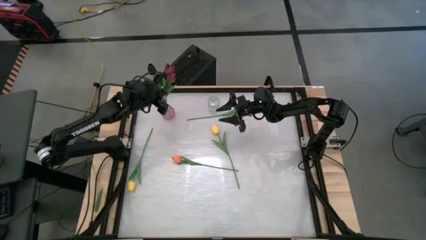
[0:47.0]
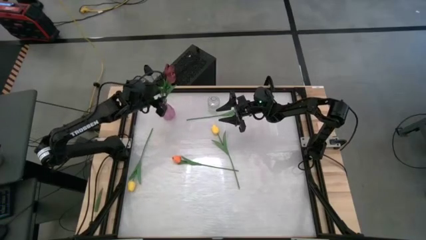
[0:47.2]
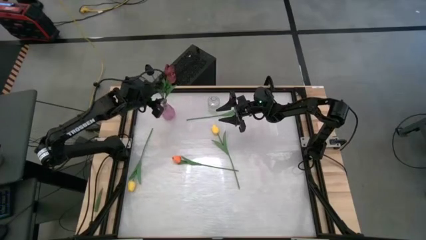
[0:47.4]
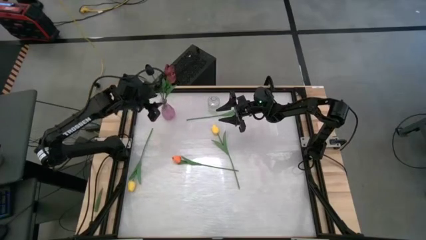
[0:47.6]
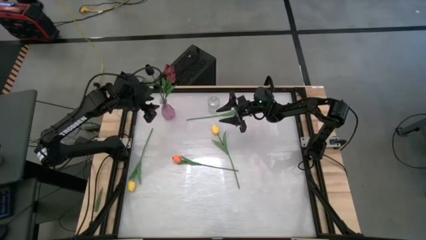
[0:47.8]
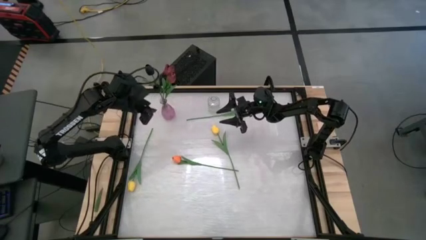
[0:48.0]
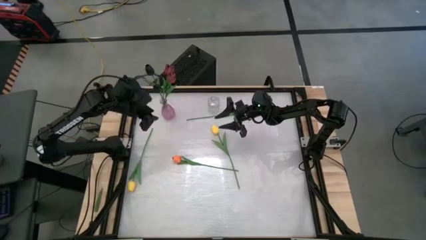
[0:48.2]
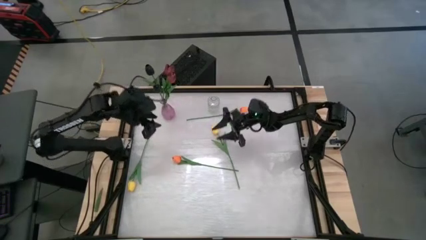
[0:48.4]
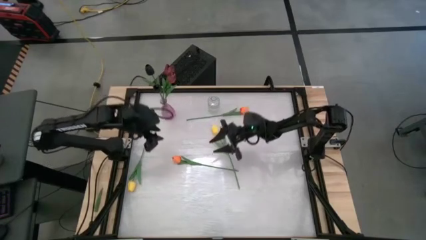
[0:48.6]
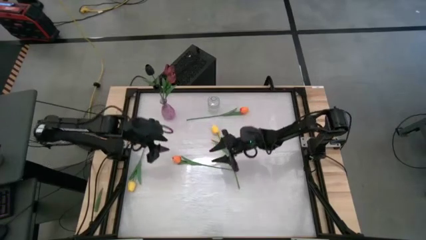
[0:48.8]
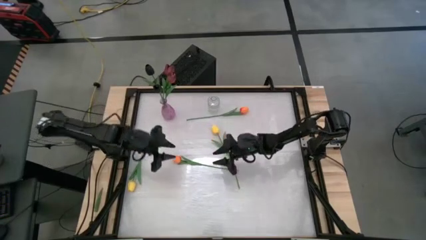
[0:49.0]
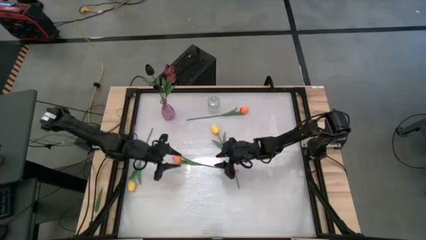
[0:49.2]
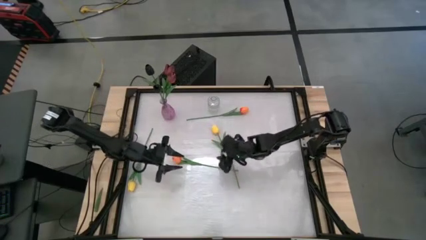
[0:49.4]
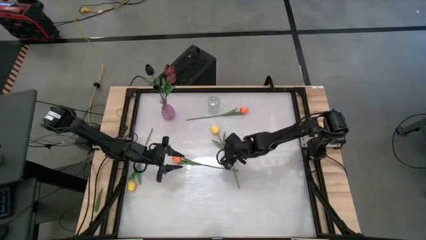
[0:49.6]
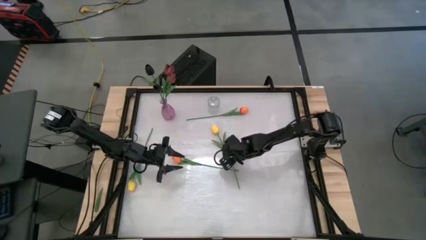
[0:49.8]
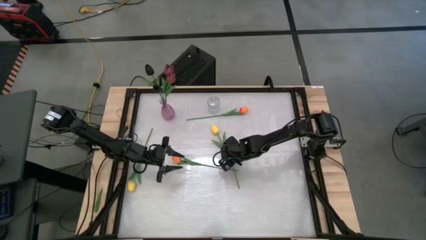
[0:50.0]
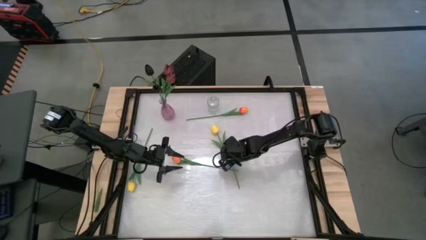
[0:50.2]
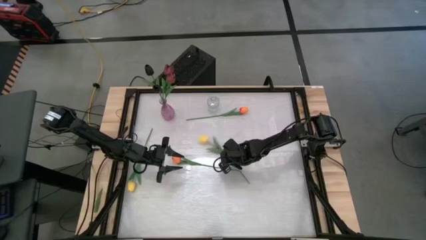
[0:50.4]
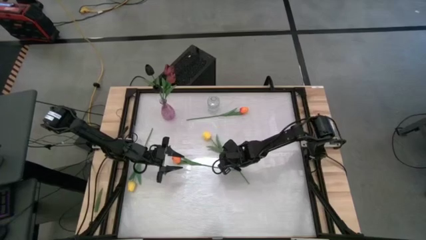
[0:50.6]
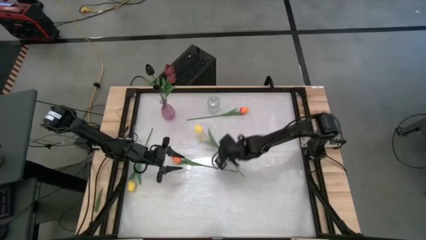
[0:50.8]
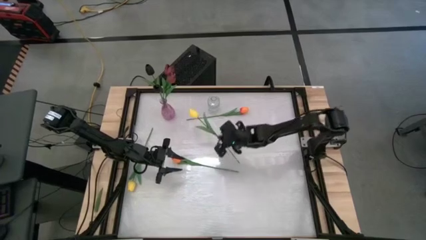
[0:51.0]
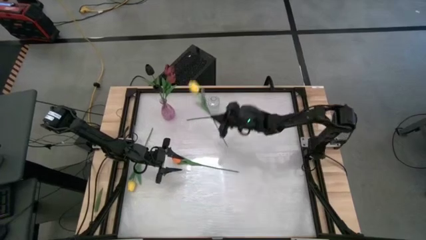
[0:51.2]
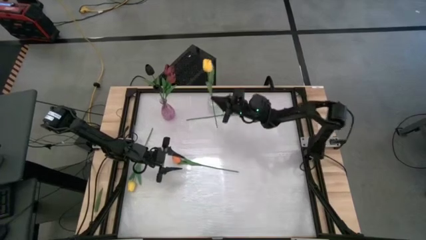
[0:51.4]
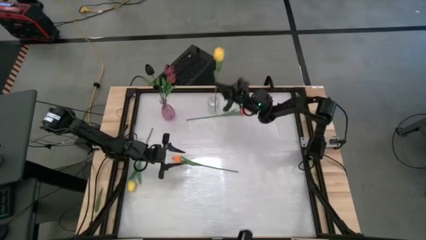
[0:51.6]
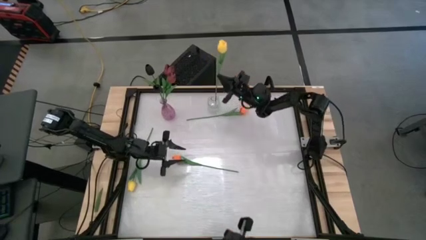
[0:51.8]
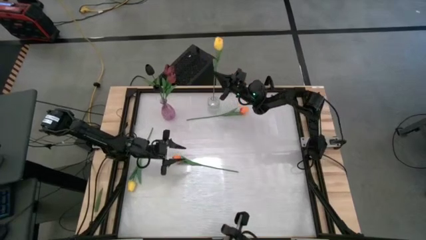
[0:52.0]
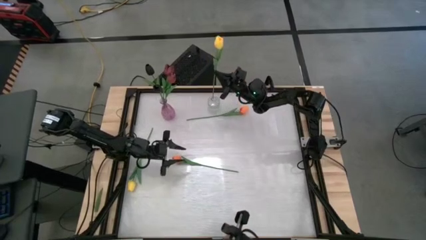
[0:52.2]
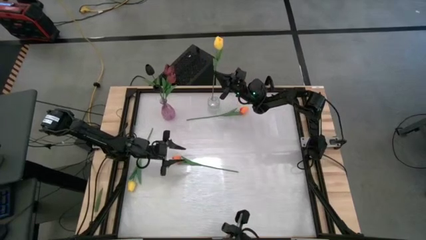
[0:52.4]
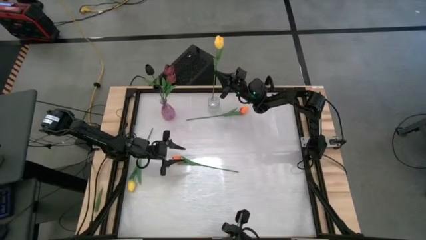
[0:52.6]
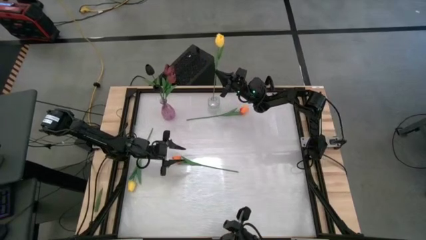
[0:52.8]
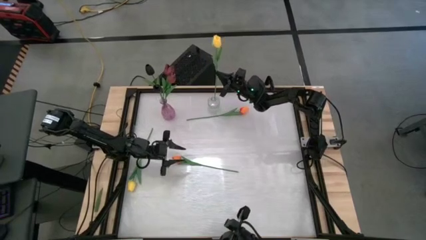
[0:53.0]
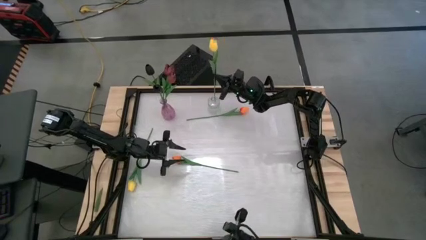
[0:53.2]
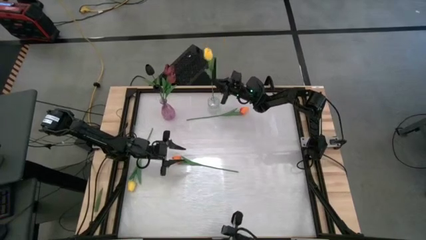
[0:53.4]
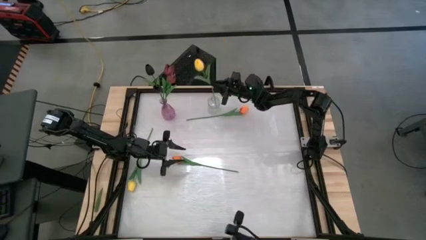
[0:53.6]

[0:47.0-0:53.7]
Task: Sort flowers into vase by color
Put the right yellow flower into the transparent vase

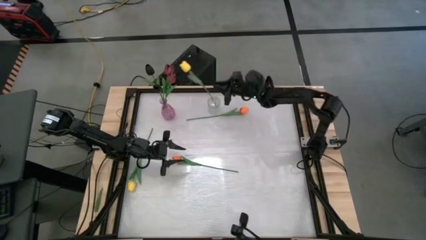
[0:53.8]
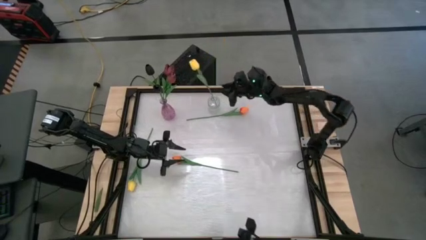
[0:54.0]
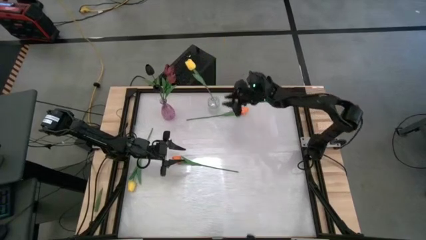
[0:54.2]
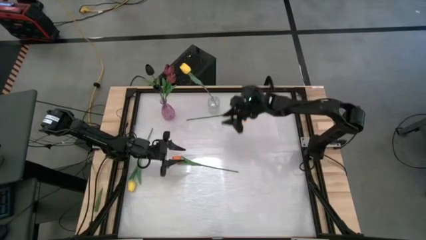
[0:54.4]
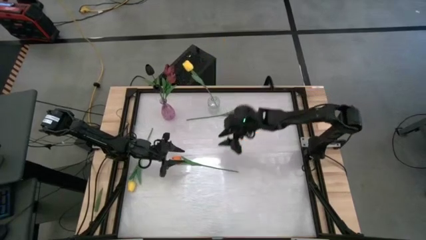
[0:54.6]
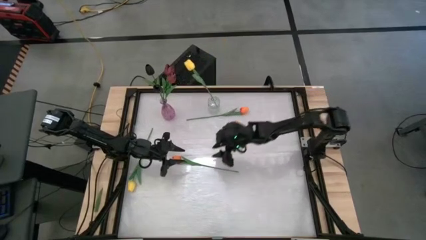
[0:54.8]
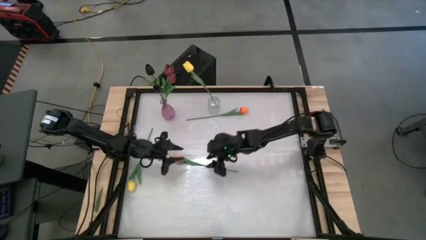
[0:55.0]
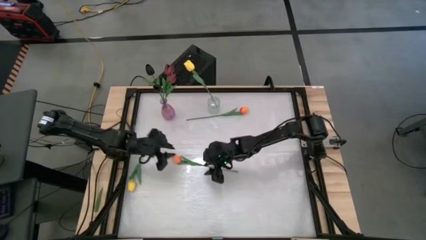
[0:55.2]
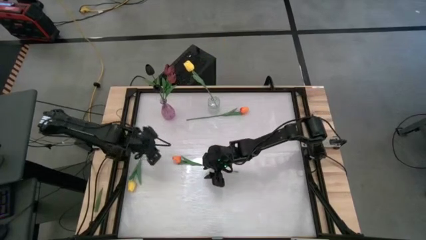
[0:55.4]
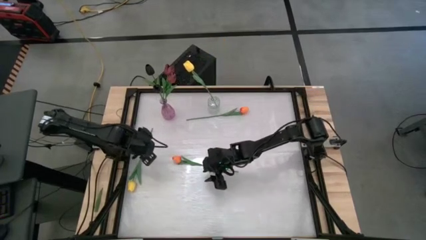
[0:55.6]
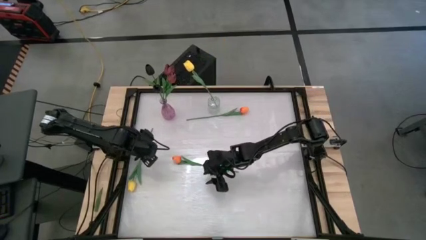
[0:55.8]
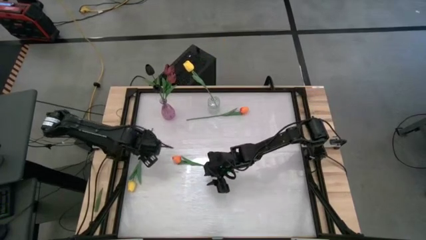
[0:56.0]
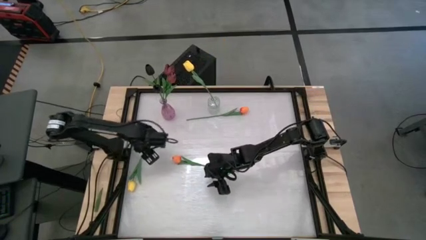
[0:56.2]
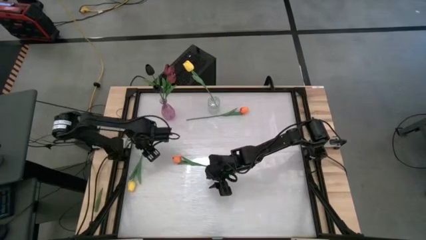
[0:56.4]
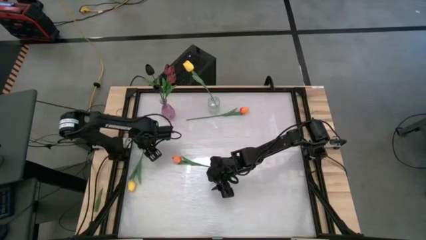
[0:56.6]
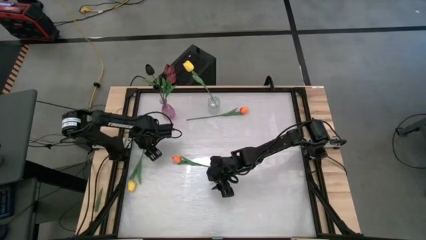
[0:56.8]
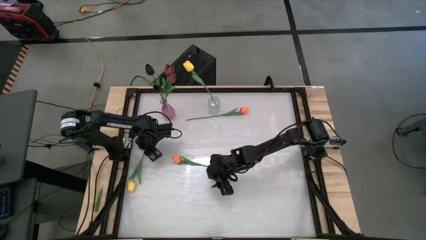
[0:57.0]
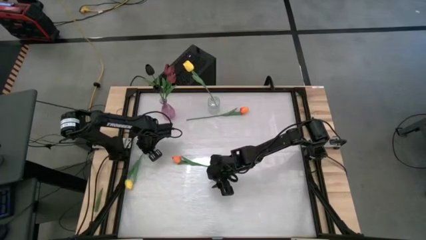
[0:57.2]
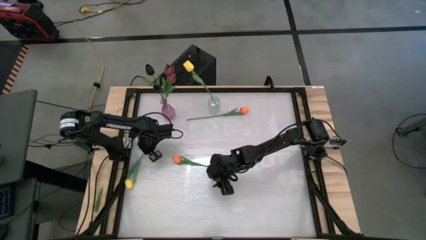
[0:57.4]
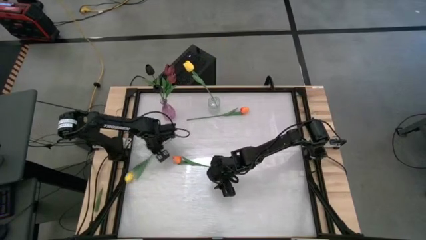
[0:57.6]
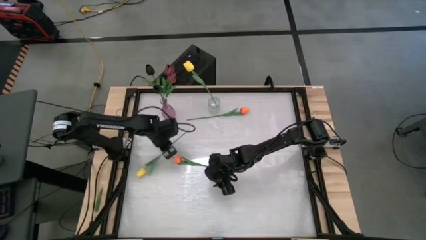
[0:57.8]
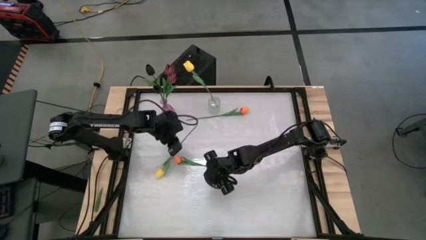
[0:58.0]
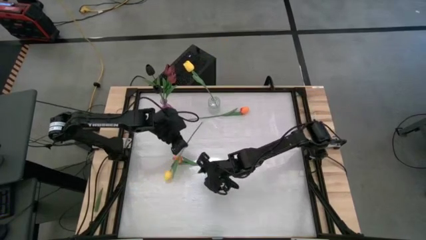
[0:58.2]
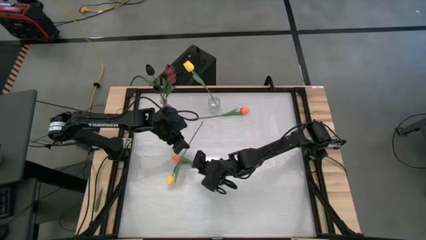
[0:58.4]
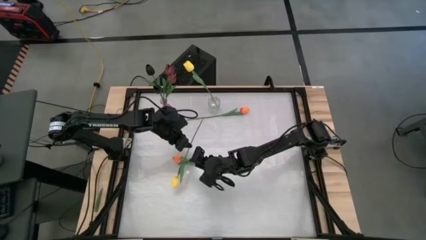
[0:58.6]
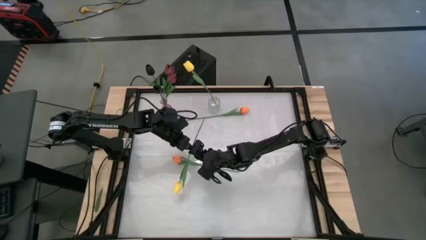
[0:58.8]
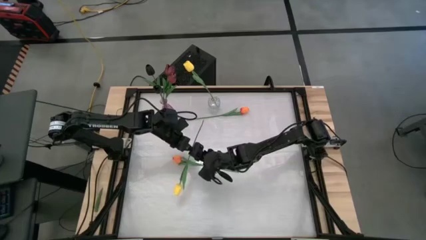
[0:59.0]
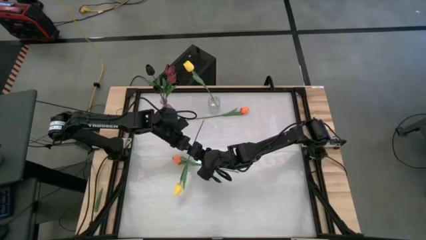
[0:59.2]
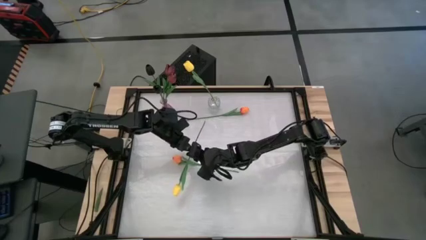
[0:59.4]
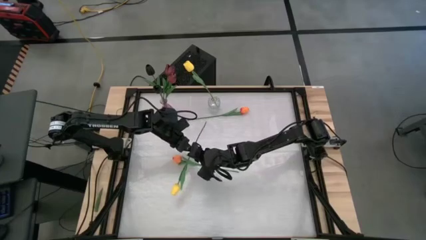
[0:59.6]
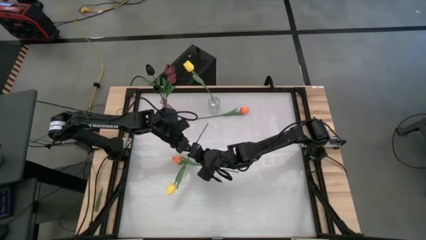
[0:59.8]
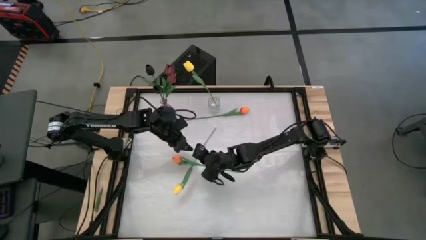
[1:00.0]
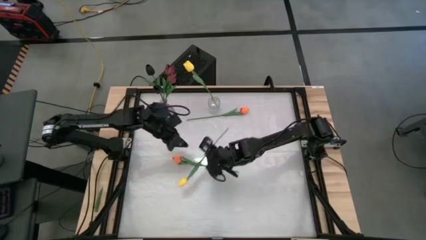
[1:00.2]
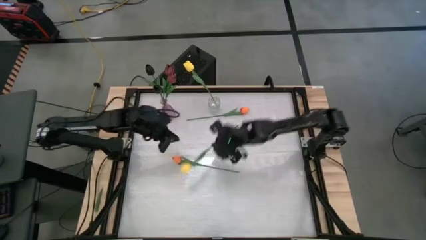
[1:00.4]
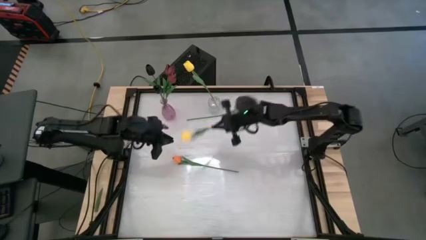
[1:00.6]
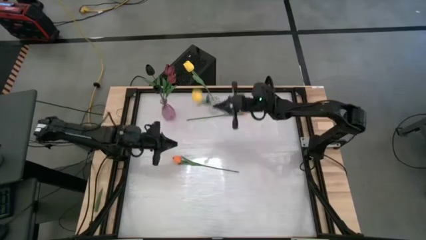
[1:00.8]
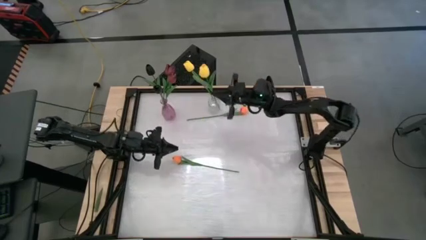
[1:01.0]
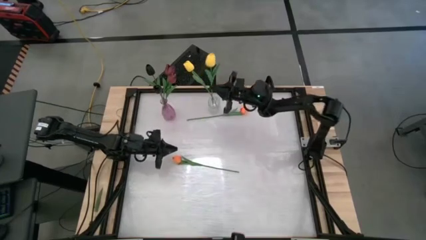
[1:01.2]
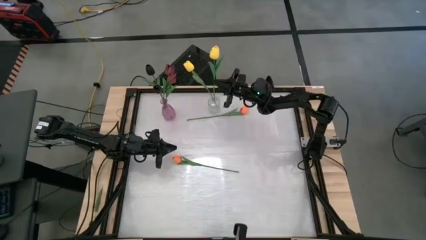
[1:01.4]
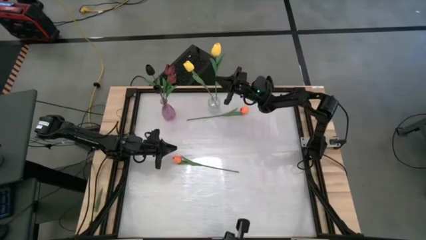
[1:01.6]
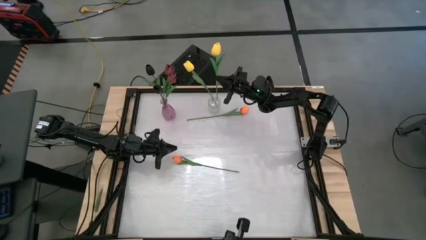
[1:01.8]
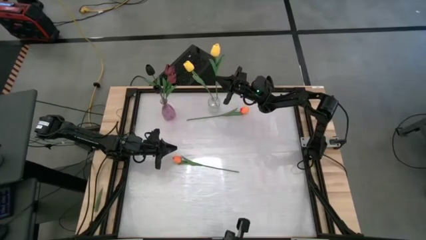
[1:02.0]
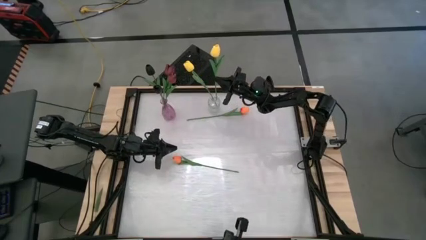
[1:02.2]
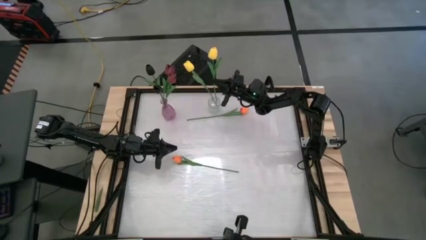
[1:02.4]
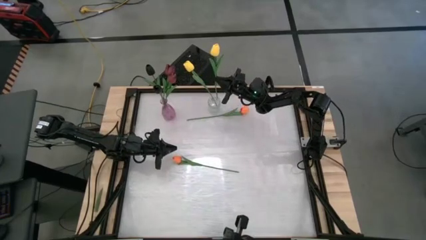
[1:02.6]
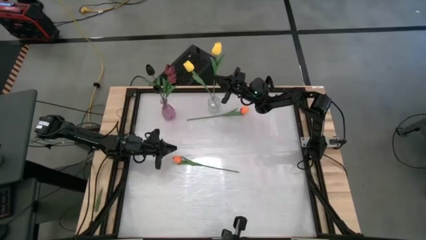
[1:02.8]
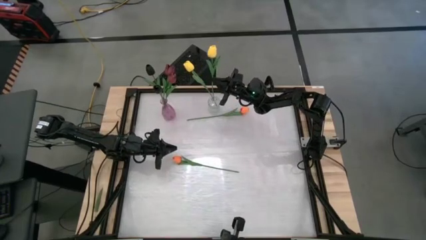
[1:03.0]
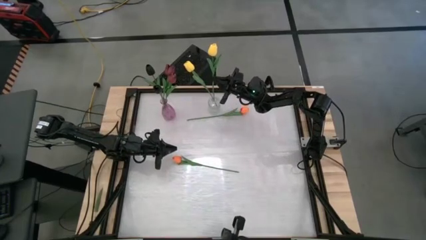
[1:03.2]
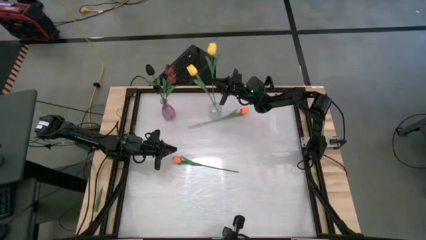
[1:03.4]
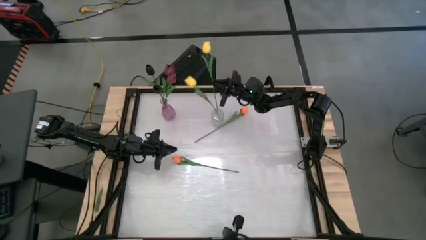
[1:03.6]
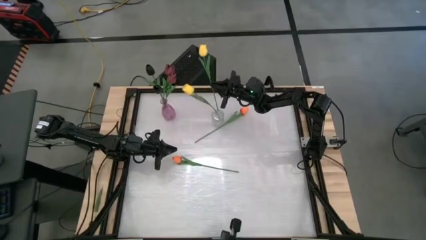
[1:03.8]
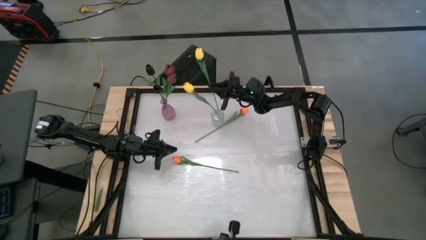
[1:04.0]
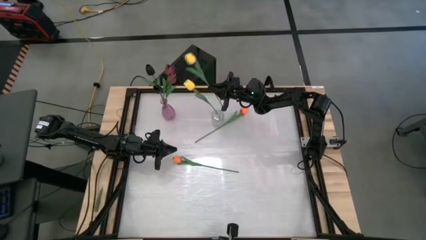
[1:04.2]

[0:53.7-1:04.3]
Put the yellow flower into the transparent vase
